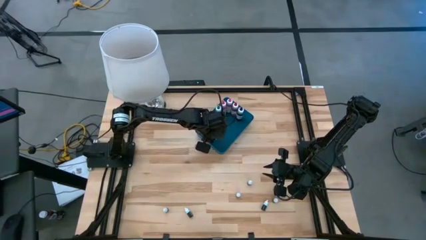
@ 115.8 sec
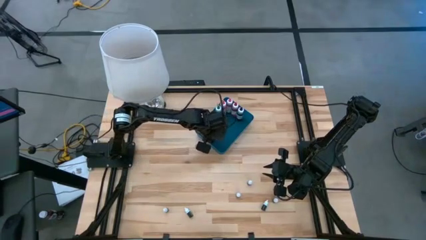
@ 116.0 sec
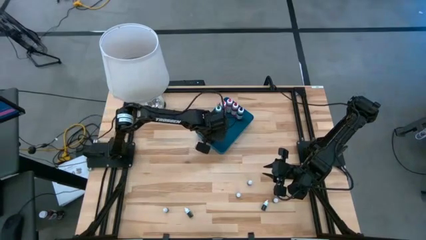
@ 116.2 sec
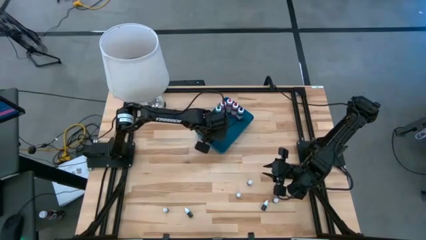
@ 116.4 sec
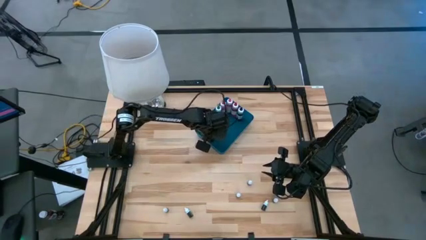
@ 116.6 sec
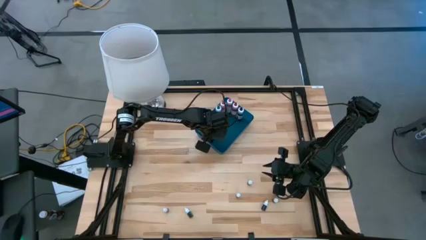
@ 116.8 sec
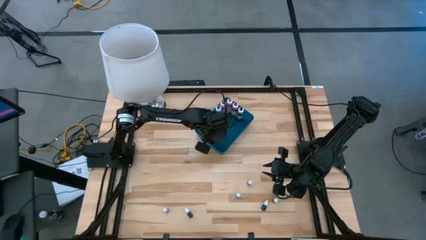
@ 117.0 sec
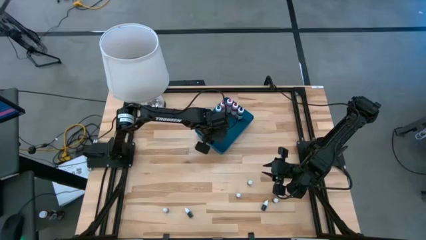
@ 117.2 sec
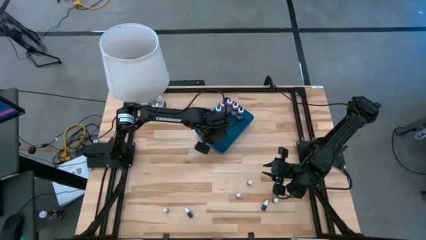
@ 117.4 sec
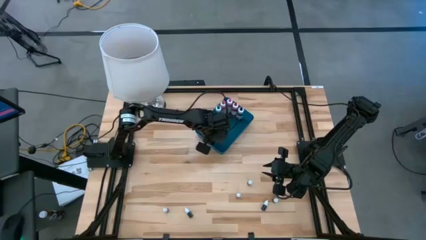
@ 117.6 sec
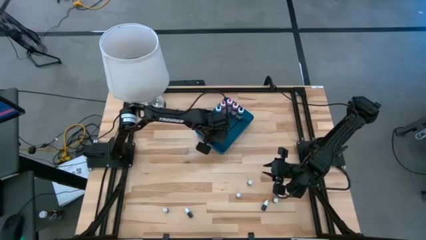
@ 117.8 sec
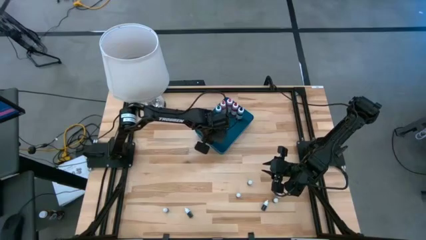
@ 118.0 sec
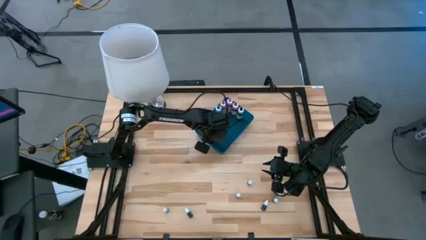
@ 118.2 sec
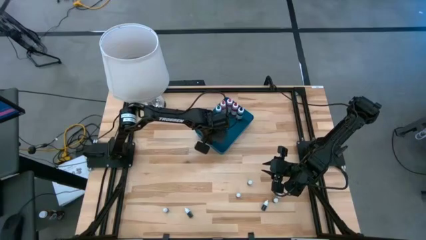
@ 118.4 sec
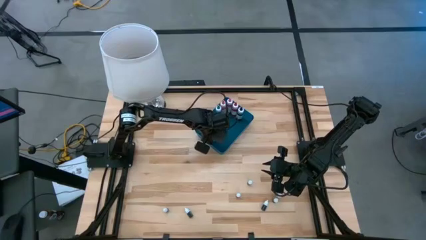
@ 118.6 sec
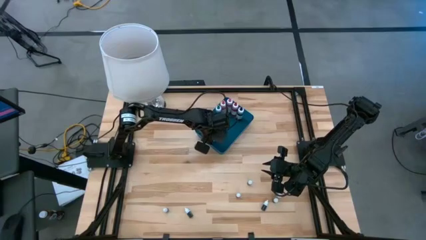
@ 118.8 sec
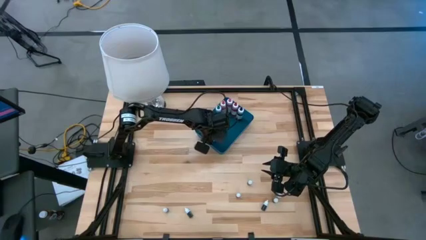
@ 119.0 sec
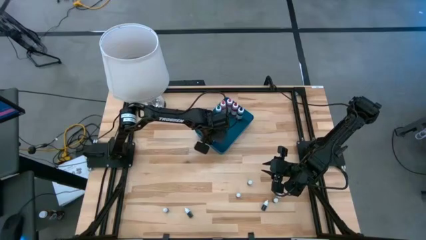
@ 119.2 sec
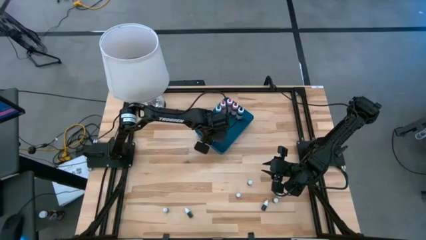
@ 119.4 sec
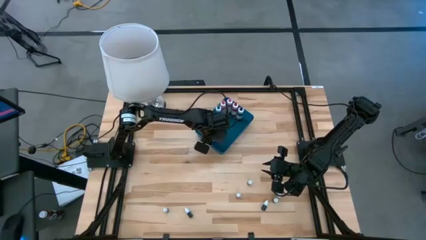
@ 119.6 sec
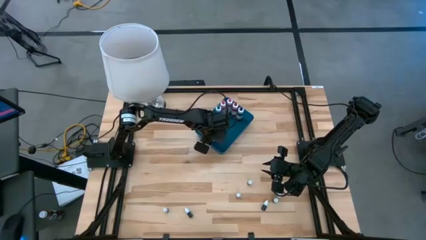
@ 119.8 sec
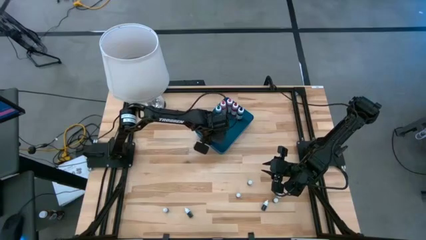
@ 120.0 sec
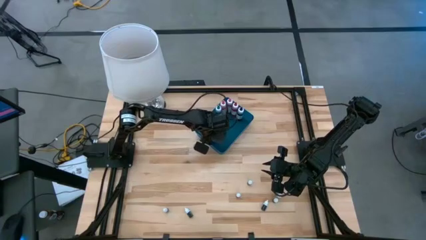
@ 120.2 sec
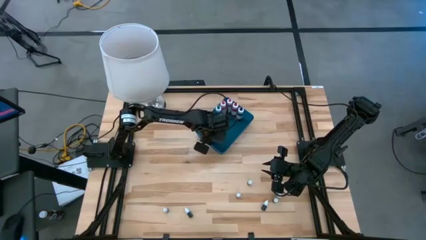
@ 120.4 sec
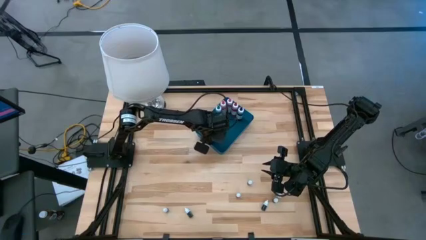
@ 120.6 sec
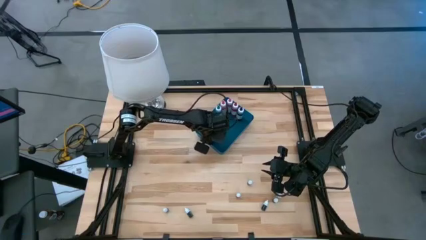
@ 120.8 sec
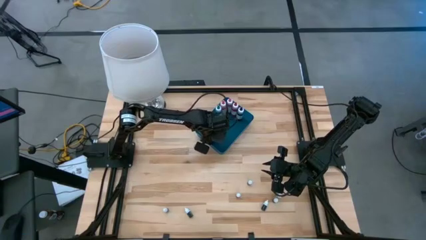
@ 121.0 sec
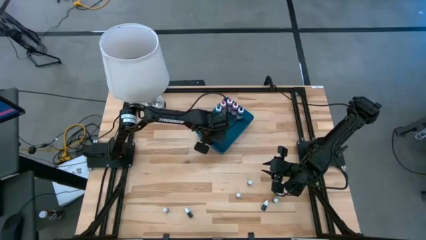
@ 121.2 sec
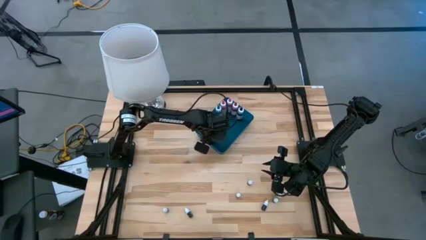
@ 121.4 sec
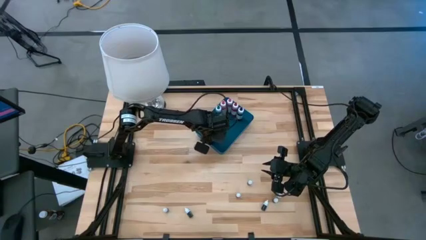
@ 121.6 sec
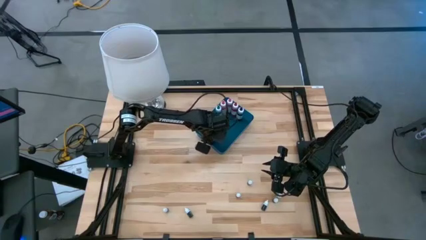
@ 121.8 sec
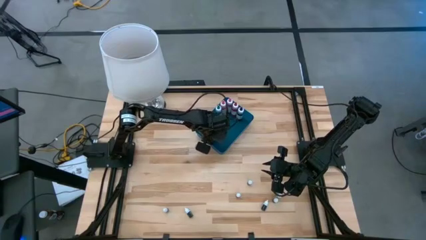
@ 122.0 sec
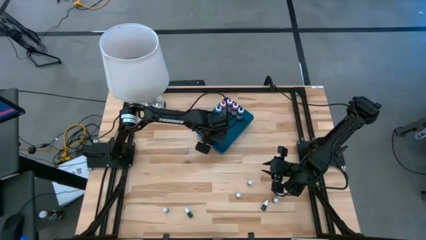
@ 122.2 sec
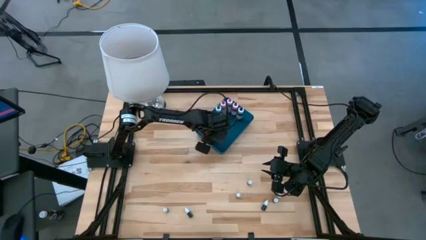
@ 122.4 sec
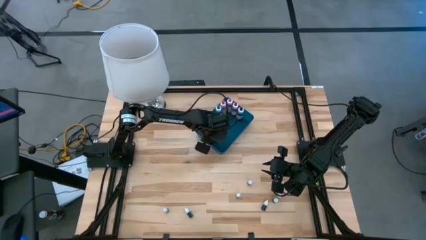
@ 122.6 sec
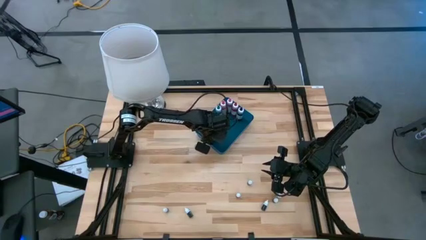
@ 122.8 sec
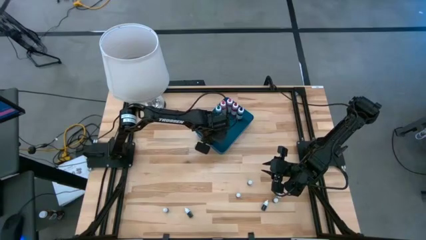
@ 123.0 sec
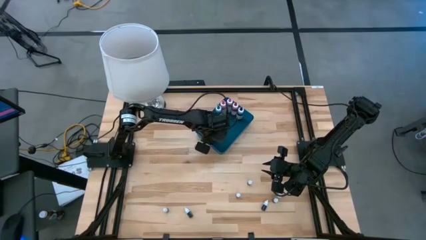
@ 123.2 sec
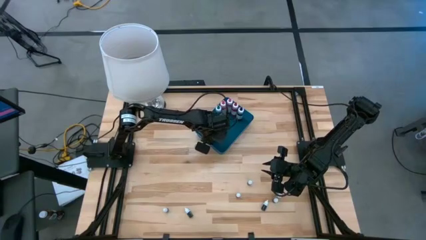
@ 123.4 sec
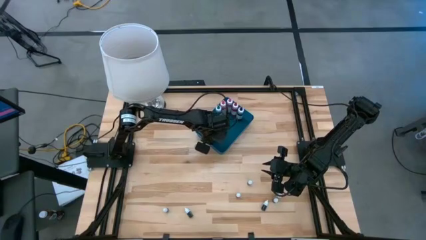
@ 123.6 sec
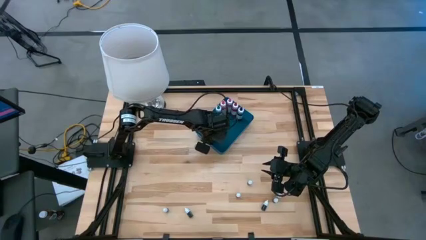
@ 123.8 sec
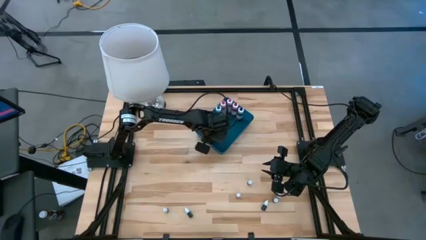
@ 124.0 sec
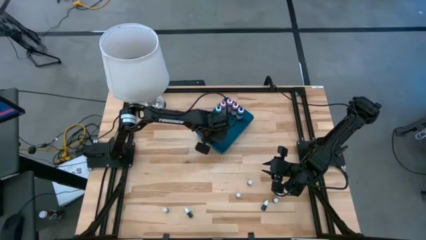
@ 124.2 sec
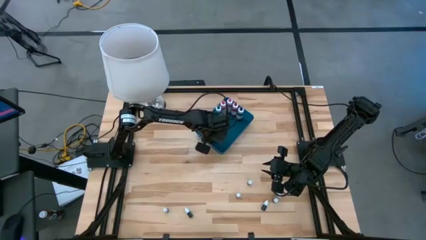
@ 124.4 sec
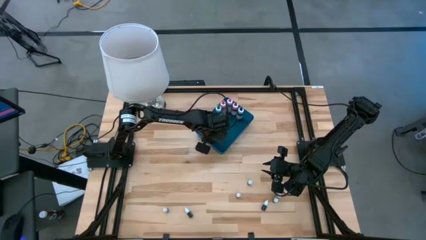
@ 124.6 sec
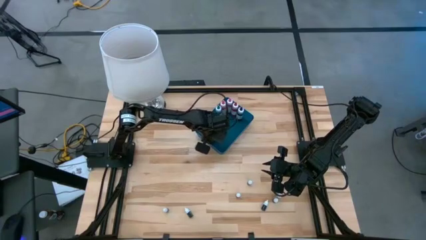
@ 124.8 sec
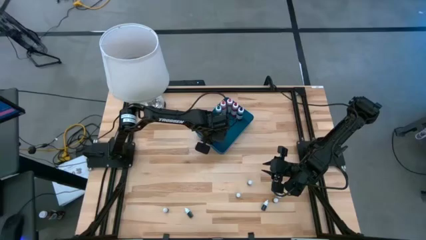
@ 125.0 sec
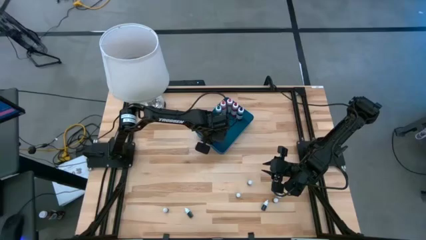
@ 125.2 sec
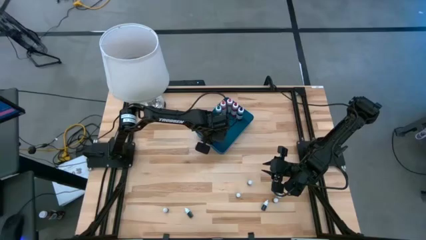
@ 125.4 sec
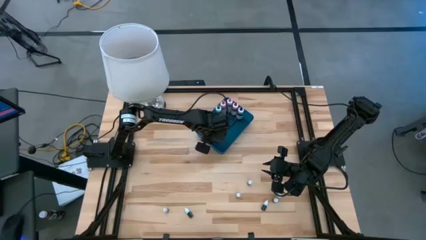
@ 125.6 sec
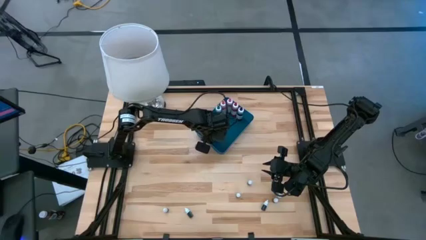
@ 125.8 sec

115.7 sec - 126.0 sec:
Task: Pick & Place food coloring
Put the small black food coloring bottle into the blue container

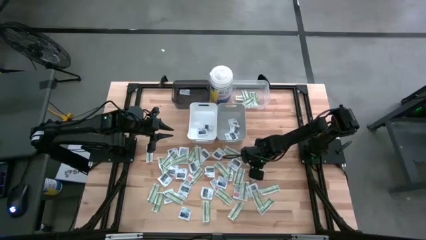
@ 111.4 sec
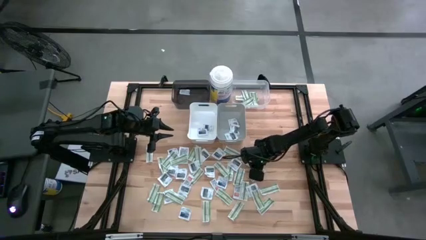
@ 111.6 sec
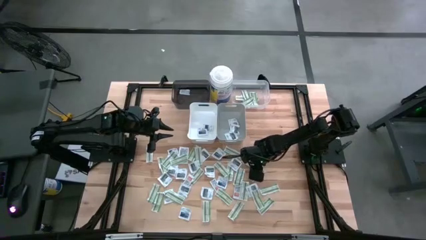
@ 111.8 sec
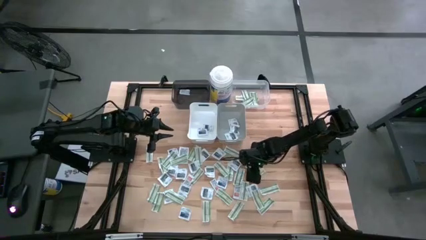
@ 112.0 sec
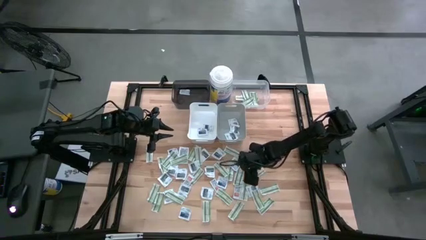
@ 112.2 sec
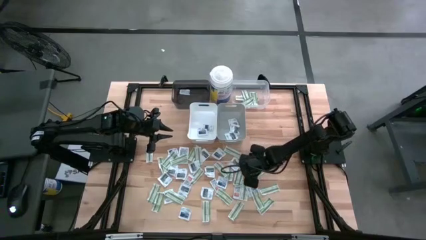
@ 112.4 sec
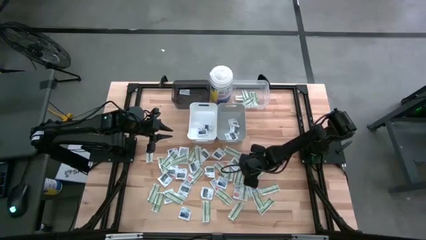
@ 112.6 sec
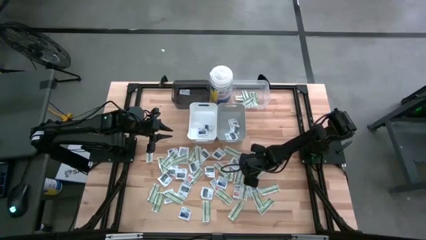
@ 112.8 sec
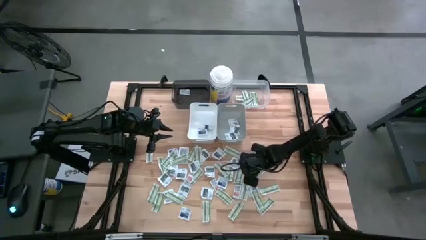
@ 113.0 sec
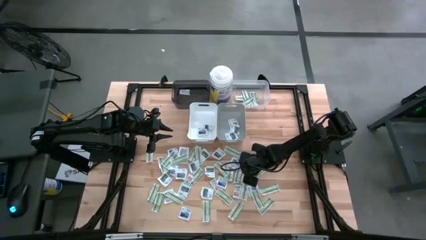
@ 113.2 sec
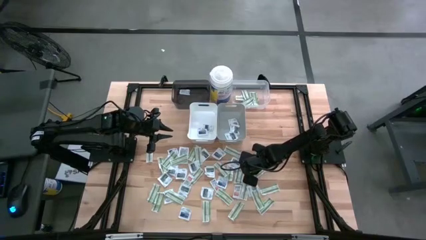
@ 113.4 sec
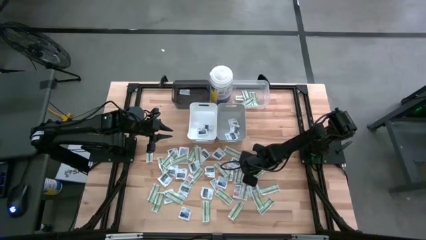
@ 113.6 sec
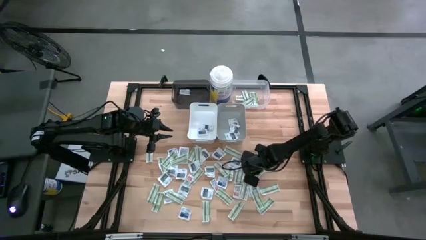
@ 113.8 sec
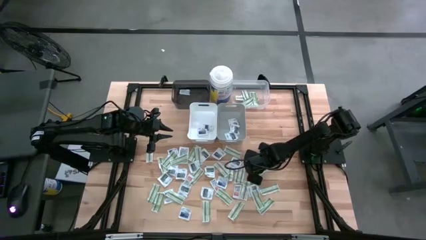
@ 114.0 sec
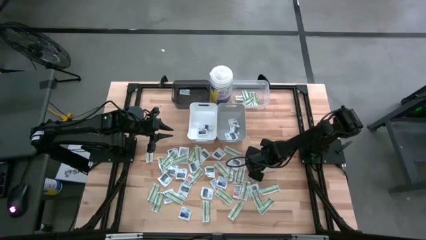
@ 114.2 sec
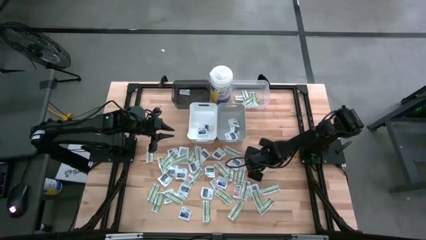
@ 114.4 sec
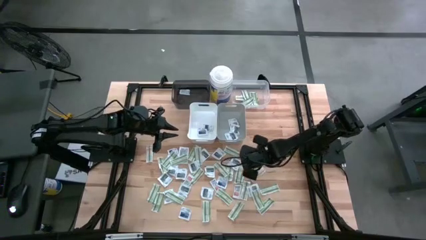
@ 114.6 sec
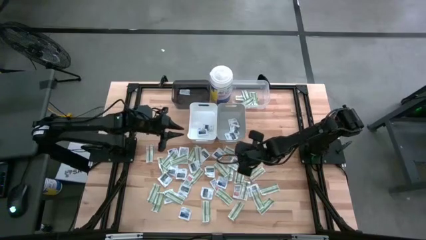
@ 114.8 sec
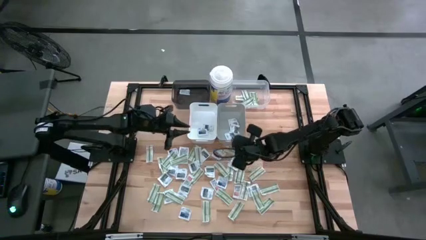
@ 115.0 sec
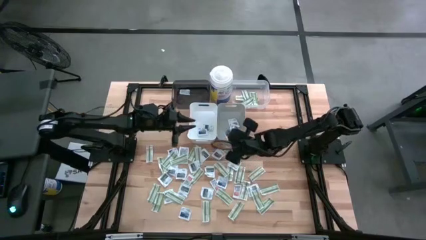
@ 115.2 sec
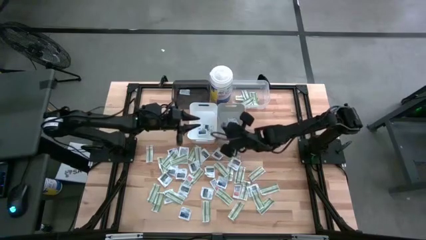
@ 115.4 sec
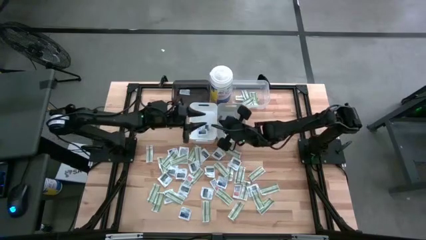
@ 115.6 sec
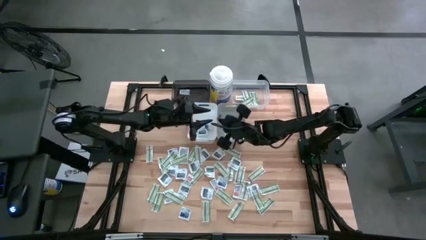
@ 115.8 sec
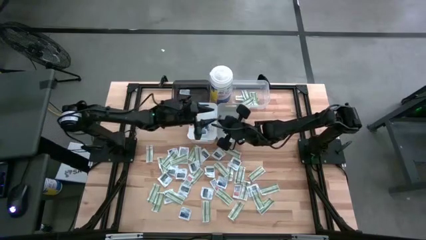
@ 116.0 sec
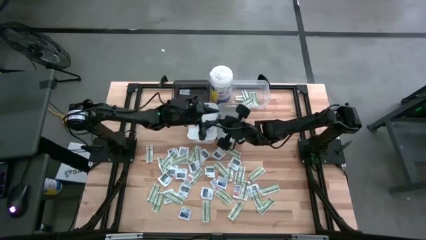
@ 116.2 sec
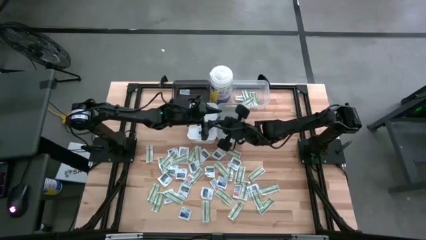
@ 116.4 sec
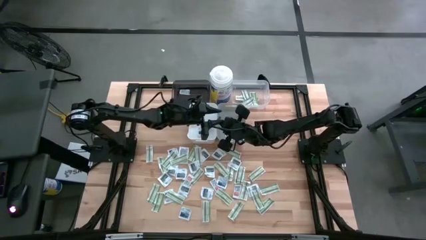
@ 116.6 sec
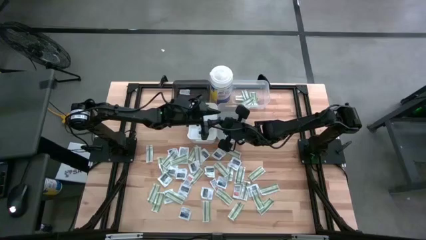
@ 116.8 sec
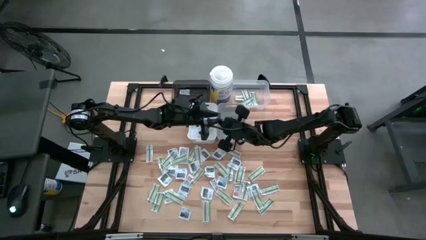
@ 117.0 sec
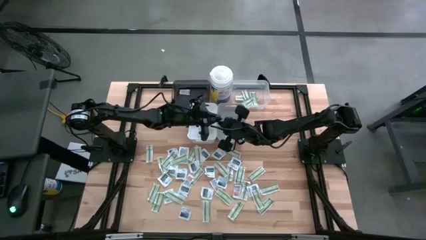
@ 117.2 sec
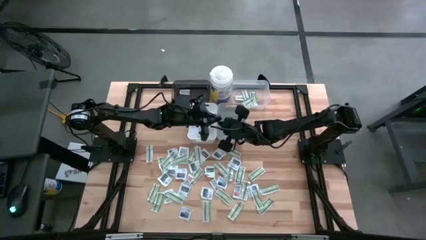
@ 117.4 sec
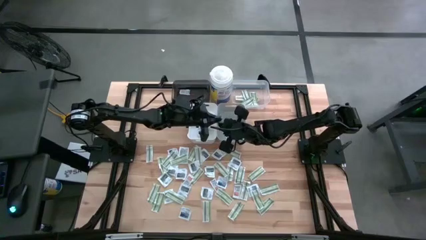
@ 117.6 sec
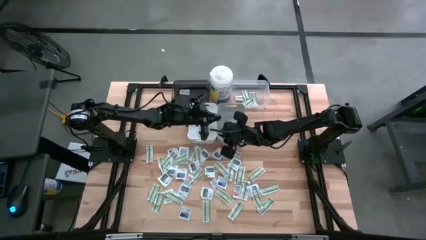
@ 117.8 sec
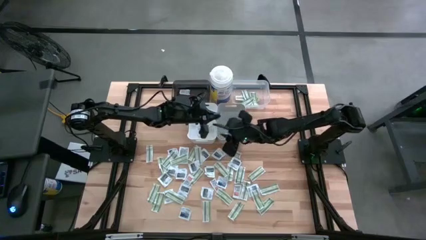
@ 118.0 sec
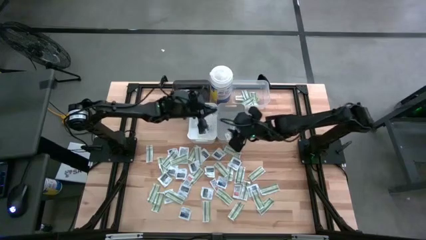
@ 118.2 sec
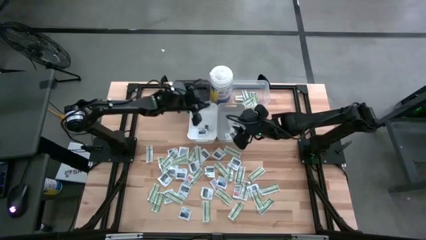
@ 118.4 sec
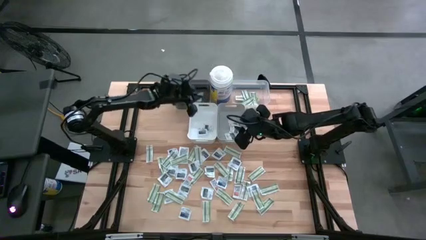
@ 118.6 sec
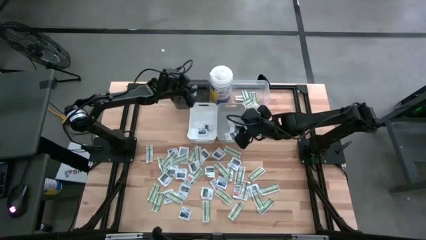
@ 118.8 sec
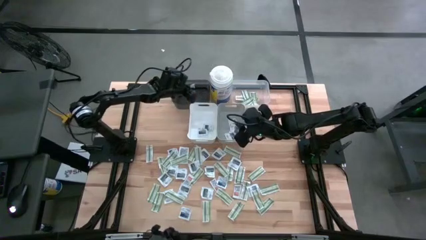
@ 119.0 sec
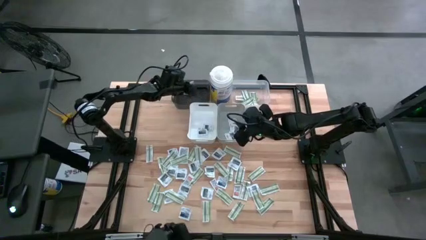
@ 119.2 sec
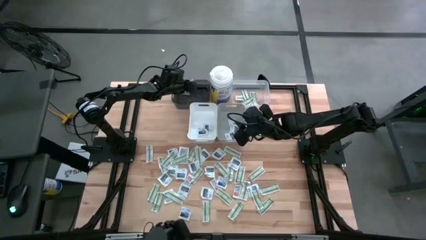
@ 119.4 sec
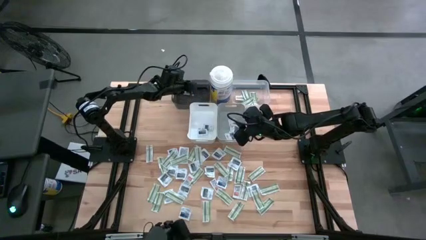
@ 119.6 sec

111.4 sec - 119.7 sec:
Task: Pick & Place First Aid Supplies
Put the ointment into the black transparent bin
